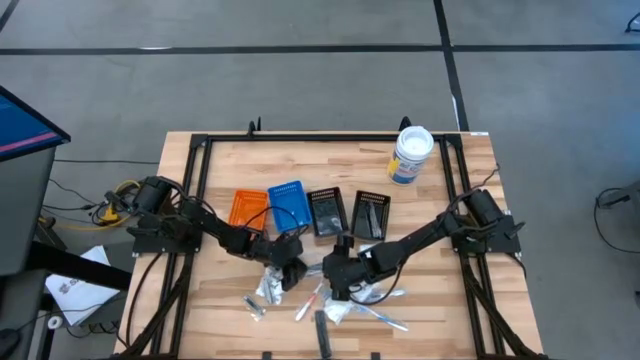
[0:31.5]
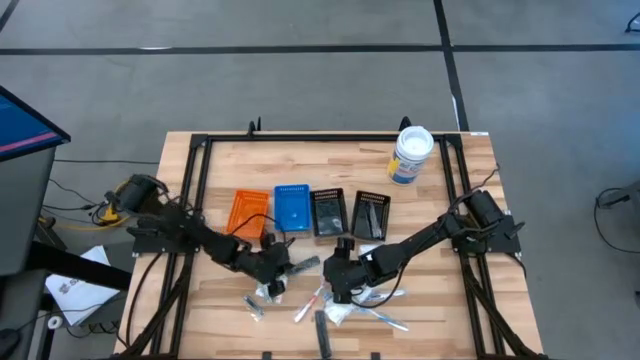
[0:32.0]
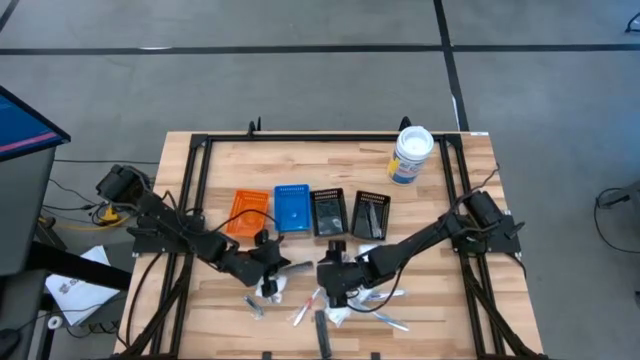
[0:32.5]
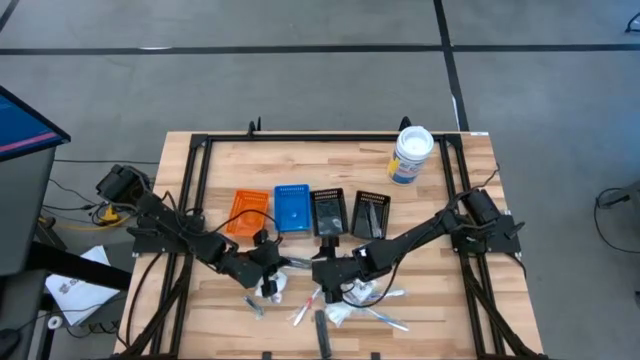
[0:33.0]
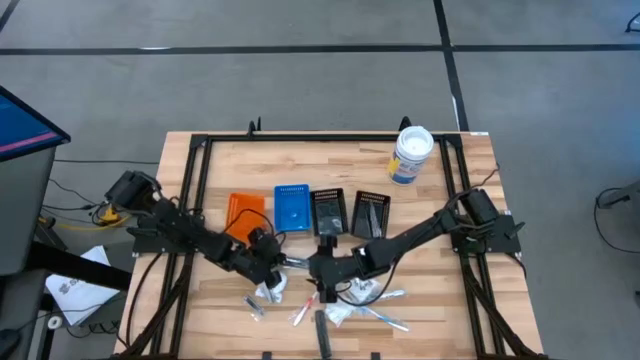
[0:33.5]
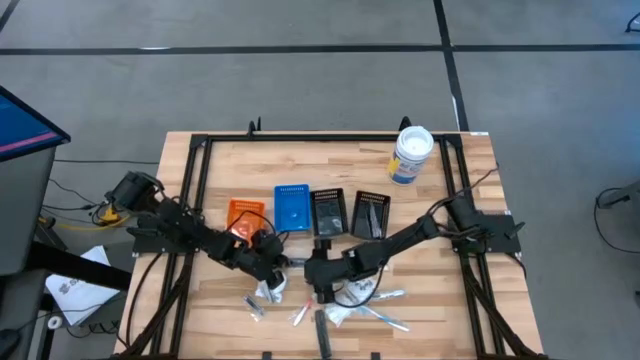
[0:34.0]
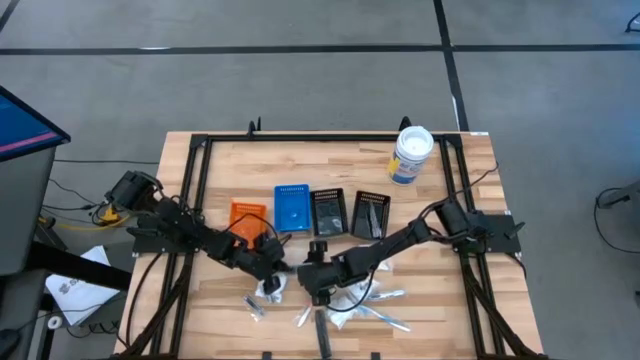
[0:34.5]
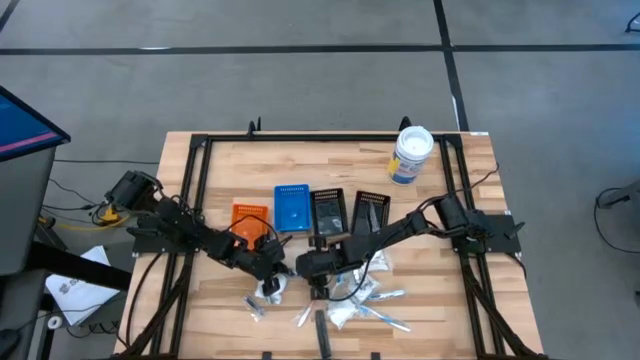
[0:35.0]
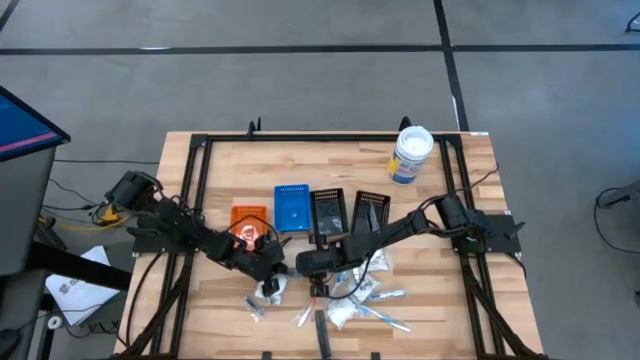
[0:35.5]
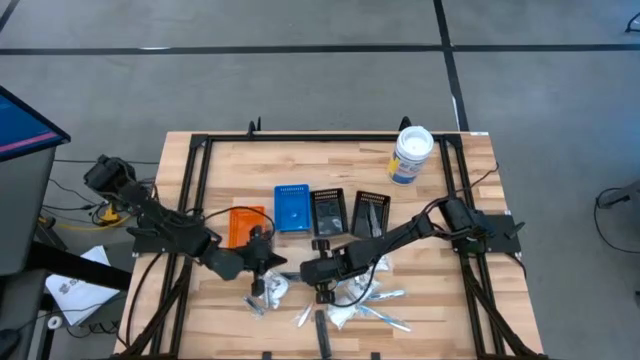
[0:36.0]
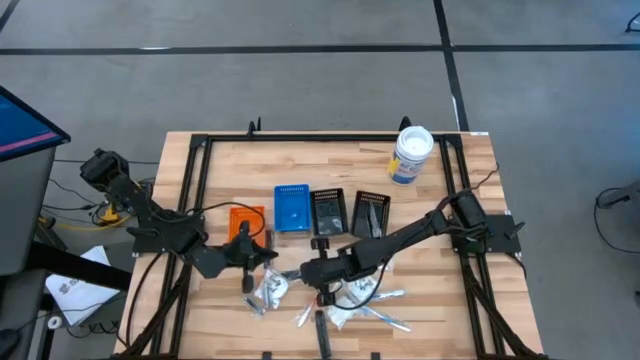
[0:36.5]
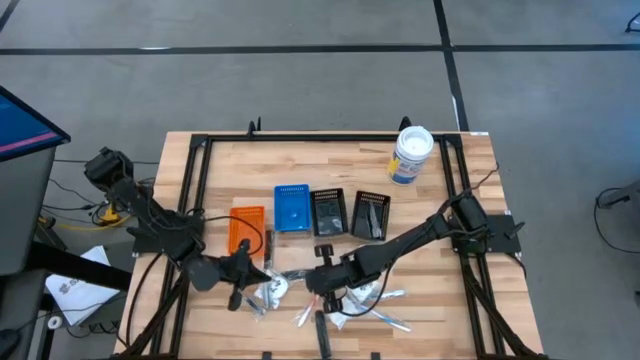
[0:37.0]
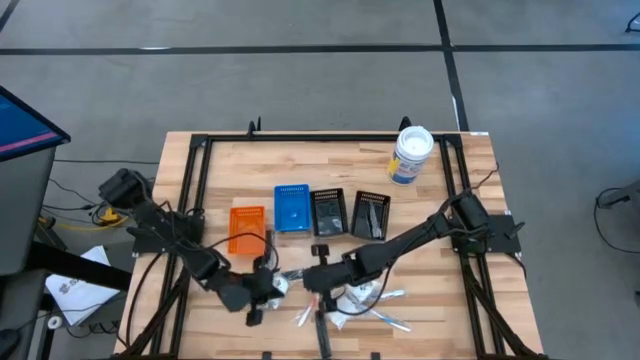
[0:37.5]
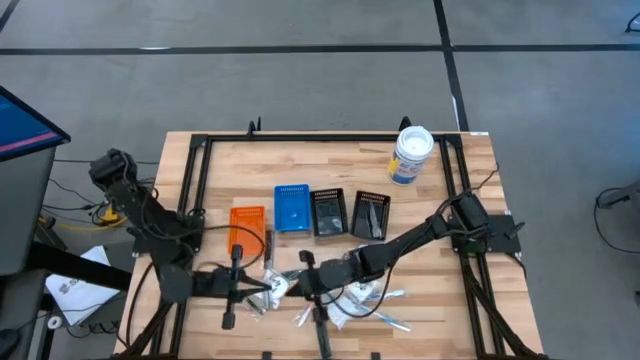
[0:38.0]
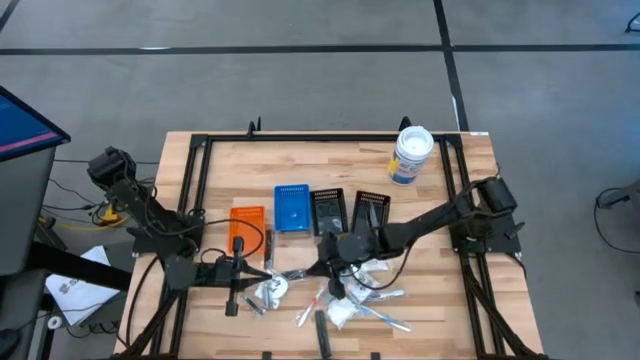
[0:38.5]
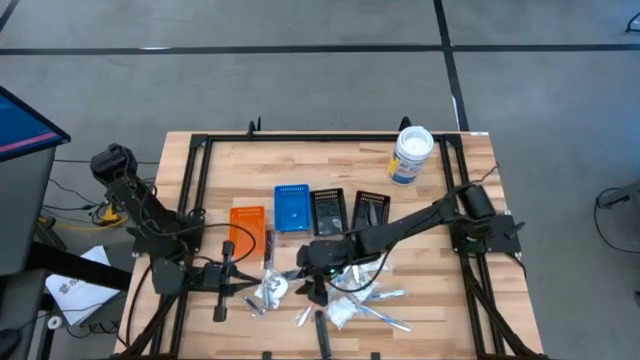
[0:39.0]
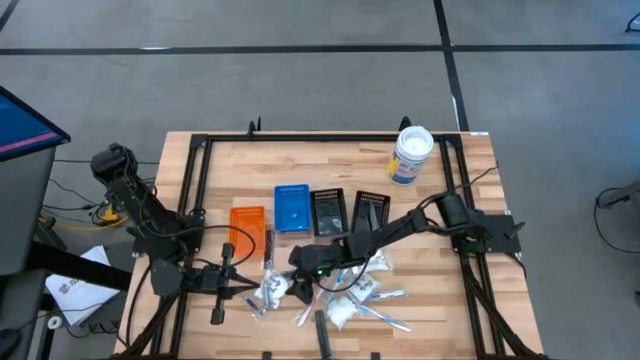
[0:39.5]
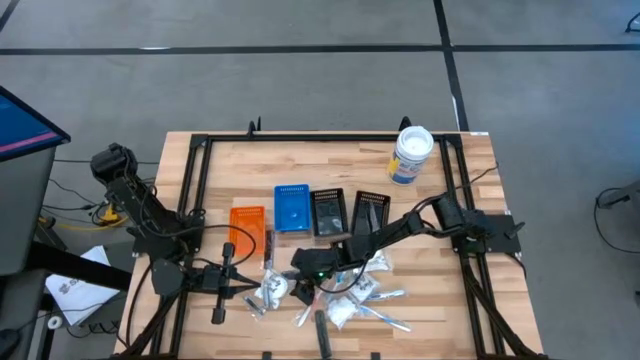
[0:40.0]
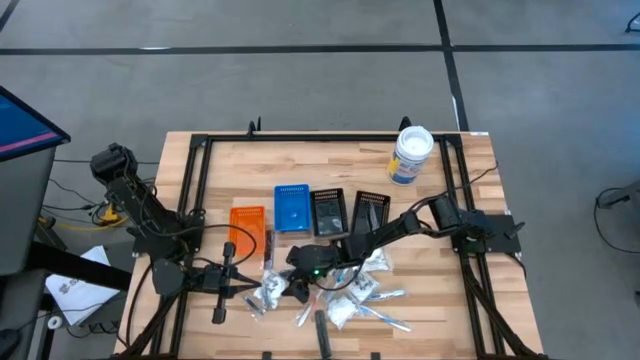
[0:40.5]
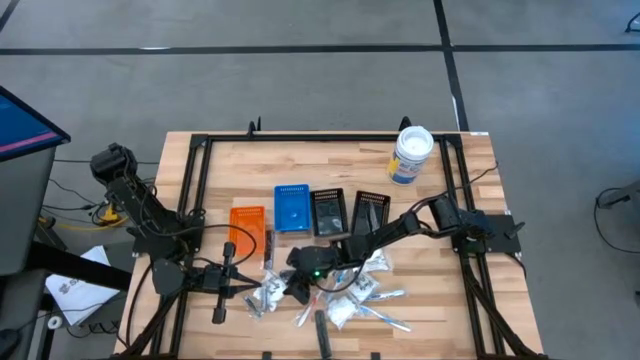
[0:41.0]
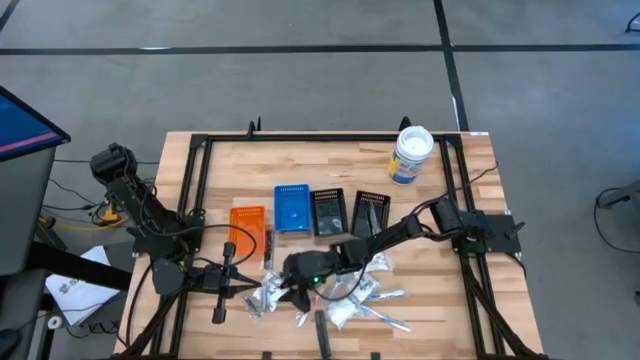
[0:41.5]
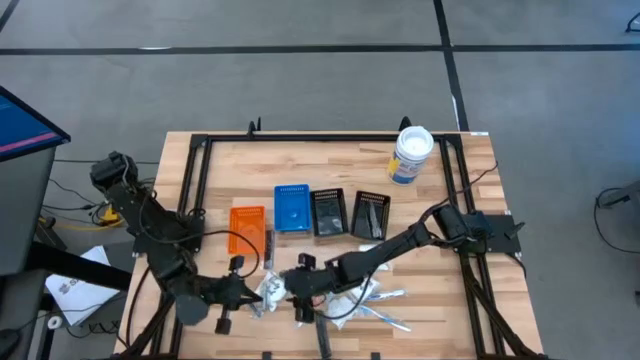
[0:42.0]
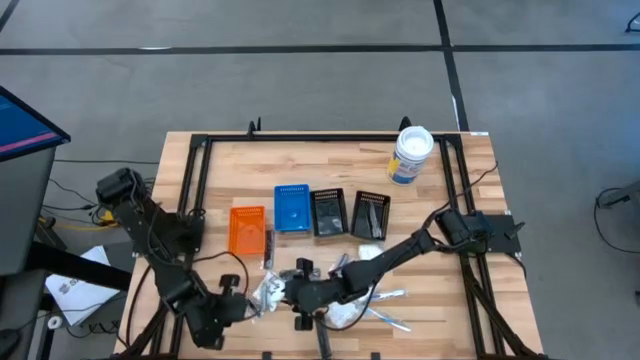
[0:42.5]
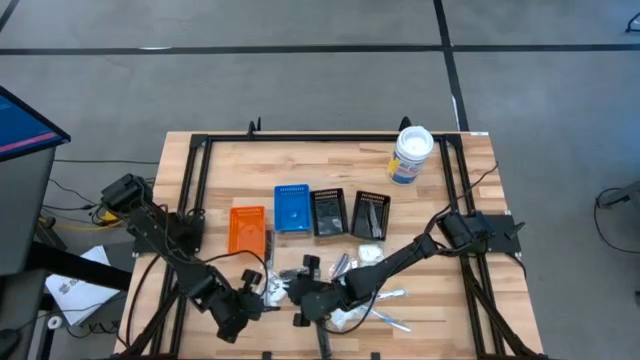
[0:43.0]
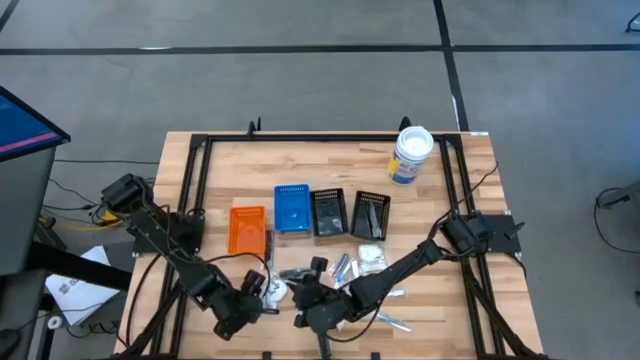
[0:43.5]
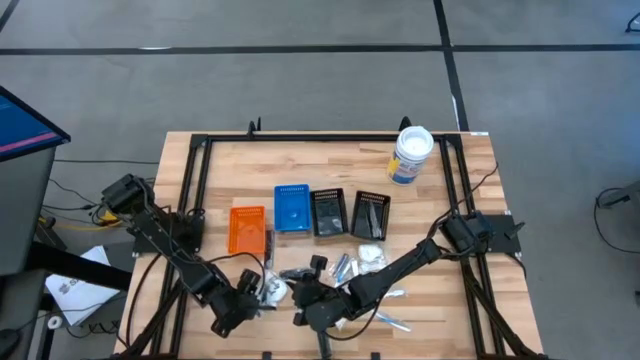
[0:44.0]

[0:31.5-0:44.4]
Task: Pick & Place Travel size toiletries
Put the black comb into the right black bin

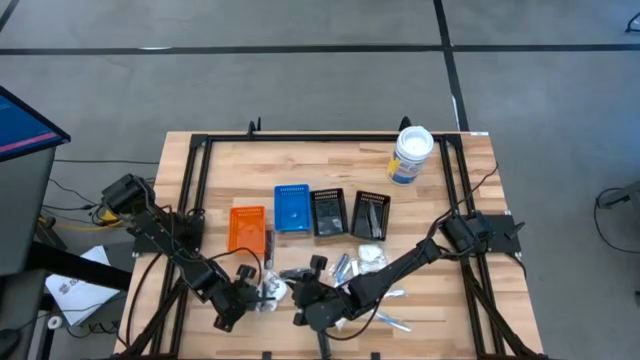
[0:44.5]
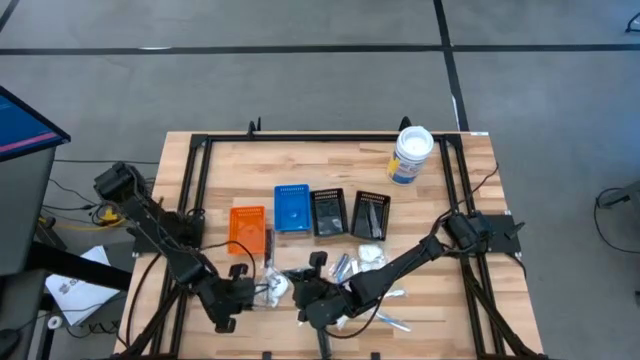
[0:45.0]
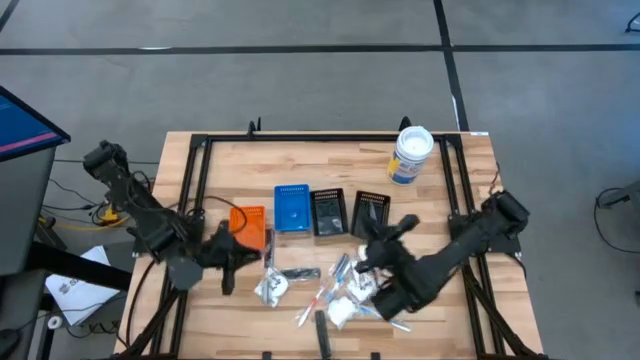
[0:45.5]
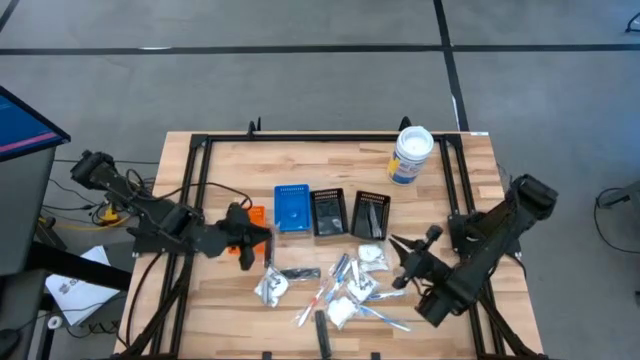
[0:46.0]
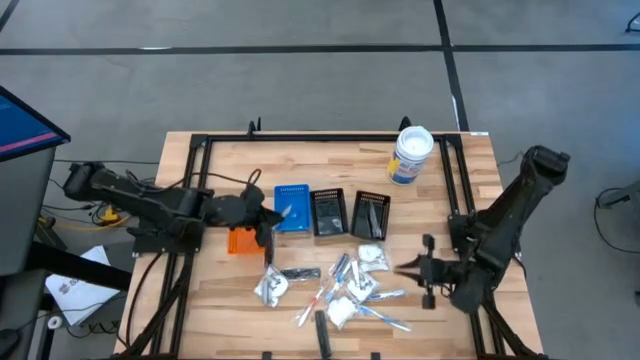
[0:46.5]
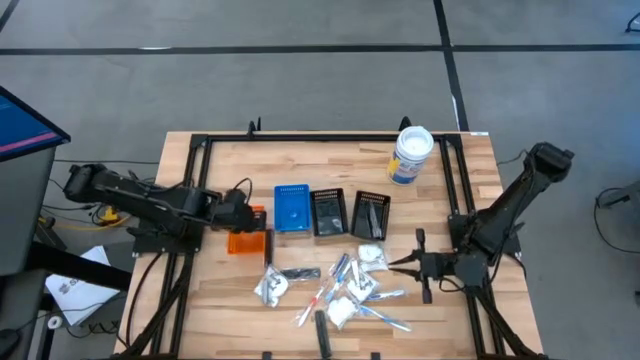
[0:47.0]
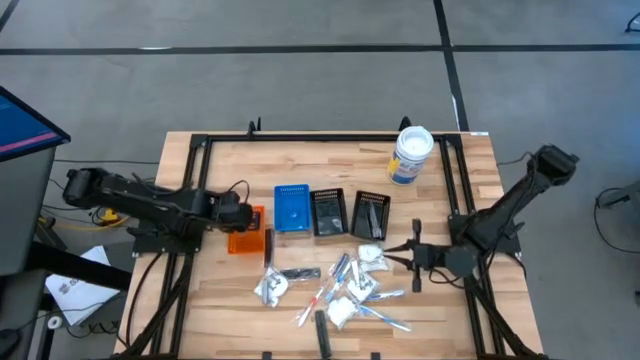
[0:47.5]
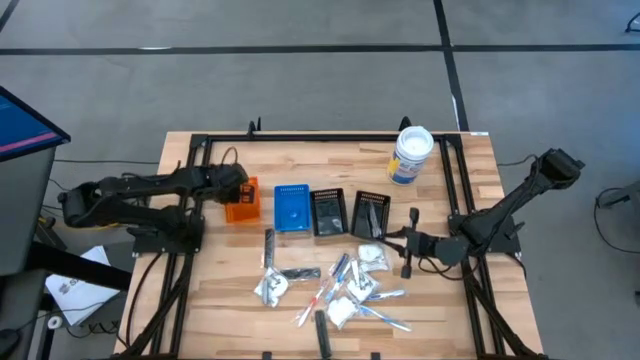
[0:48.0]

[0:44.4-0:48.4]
Put the nail clippers into the orange bin

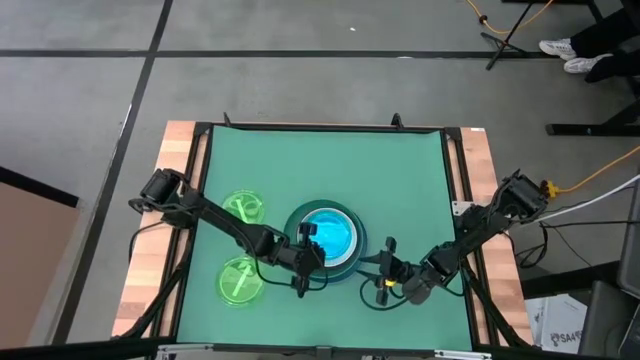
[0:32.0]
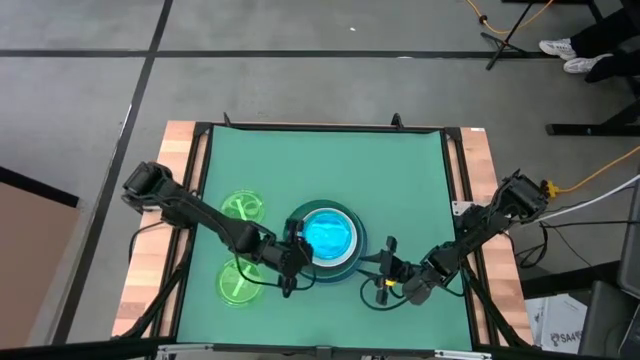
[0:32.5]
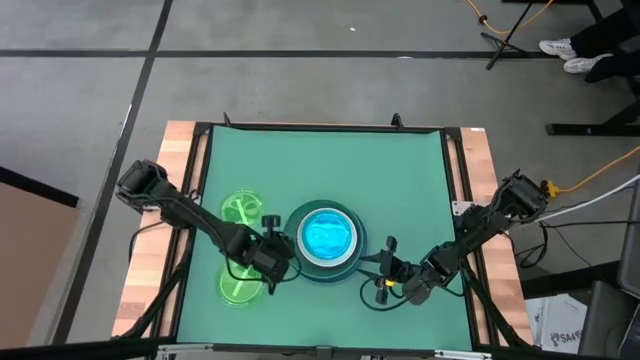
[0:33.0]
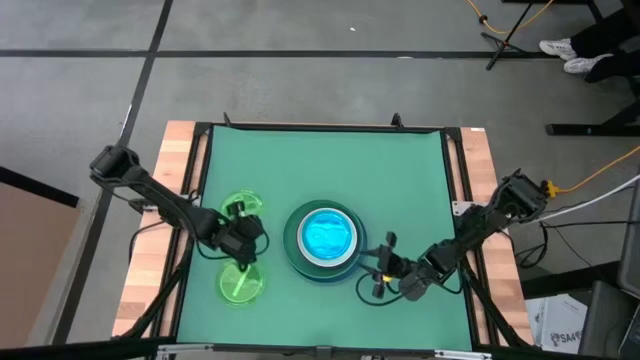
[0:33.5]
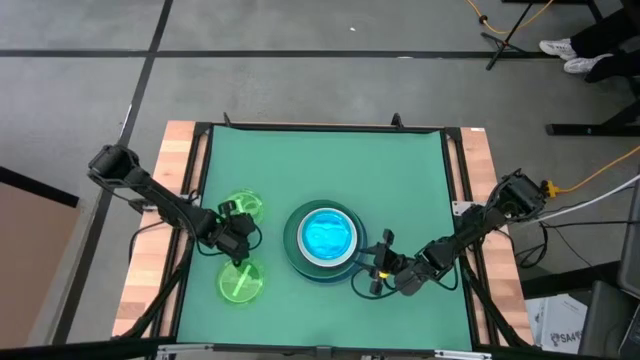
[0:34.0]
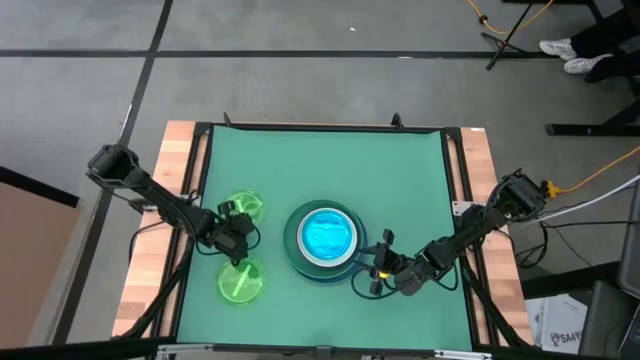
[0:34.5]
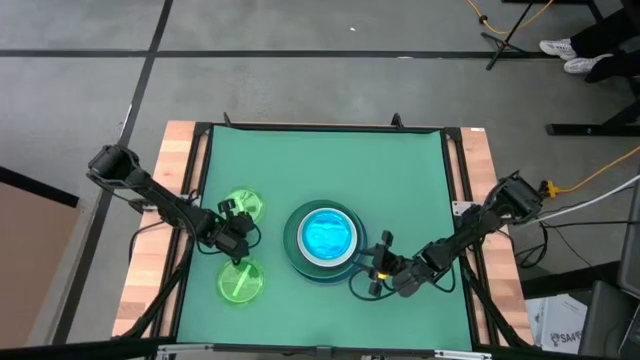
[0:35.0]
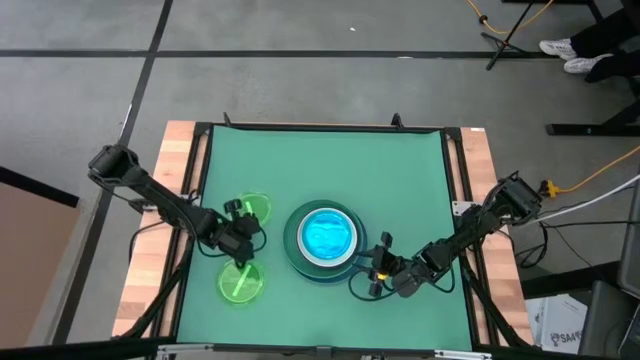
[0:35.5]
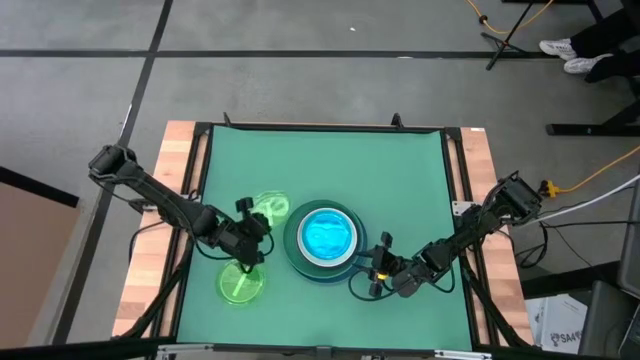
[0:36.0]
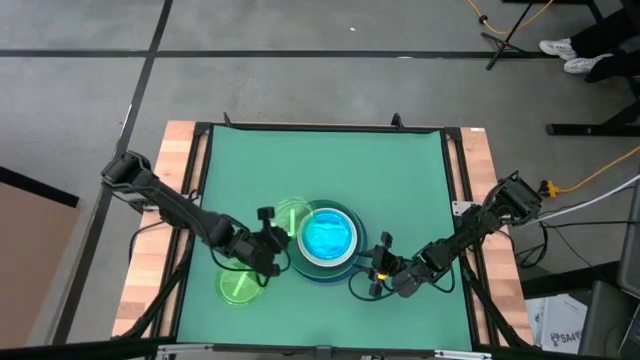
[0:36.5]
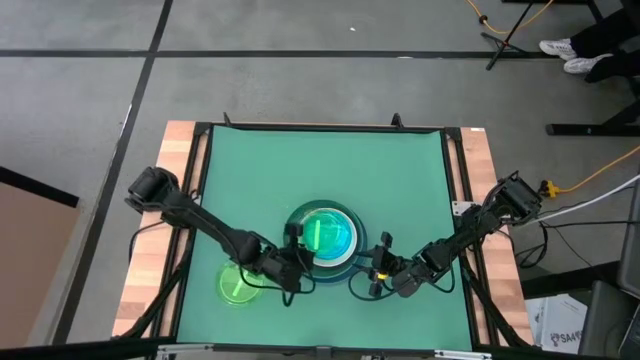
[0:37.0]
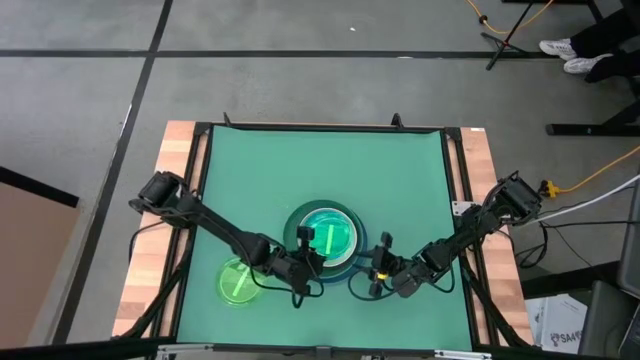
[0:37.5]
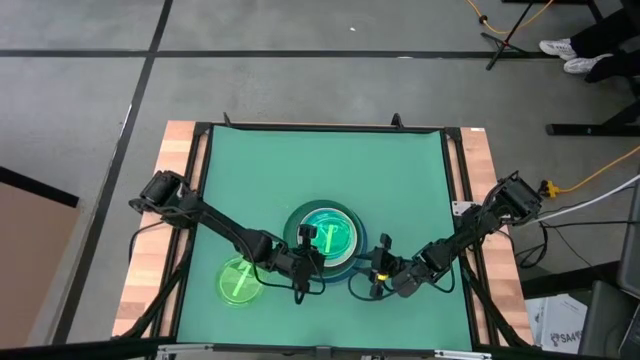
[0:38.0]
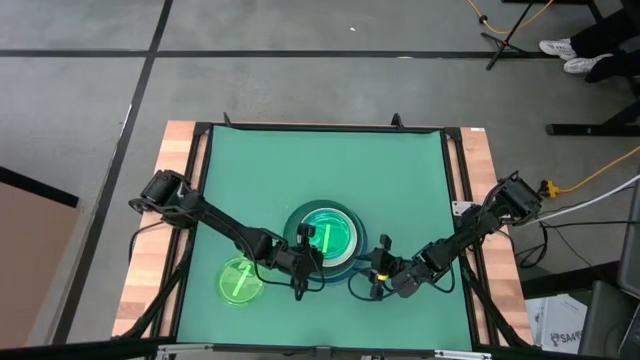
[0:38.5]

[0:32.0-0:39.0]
Task: Stack plastic plates
Stack the top green plate on top of the light blue plate
